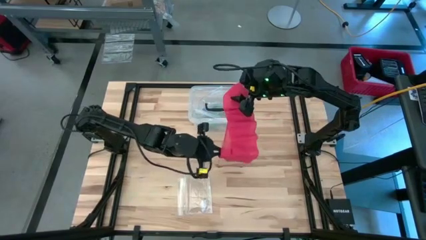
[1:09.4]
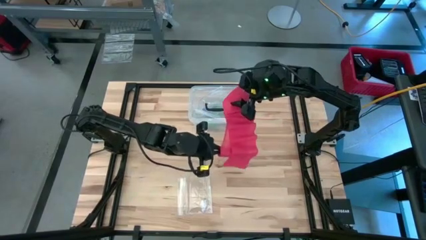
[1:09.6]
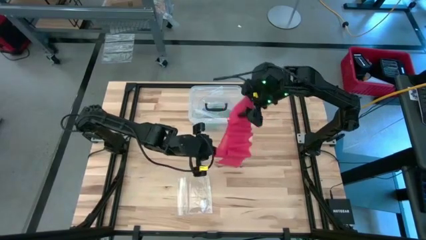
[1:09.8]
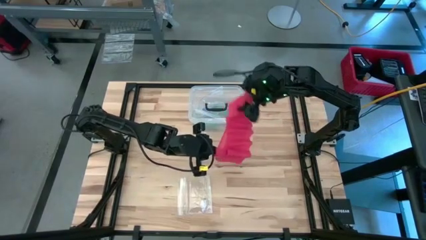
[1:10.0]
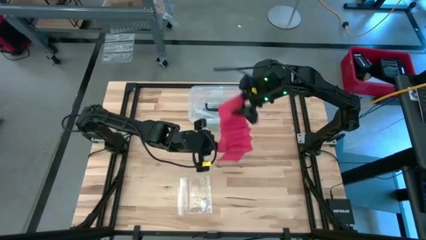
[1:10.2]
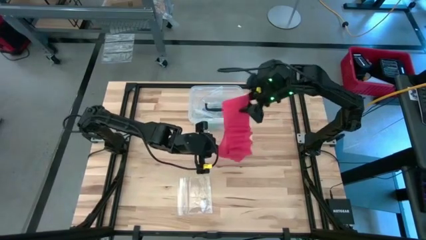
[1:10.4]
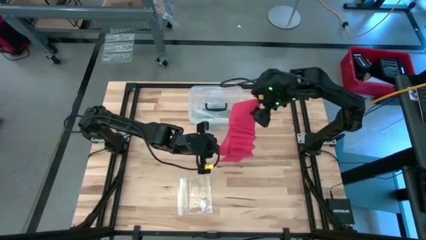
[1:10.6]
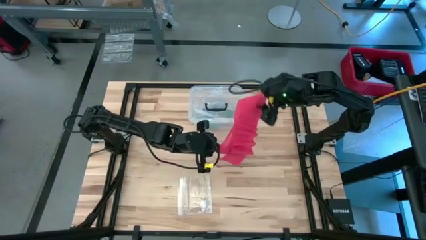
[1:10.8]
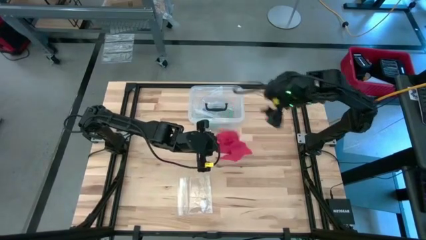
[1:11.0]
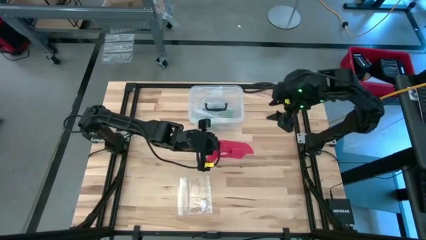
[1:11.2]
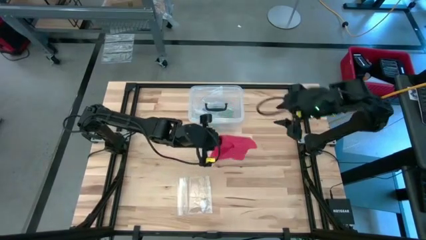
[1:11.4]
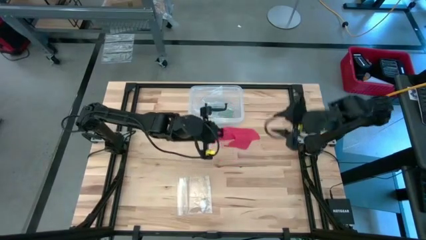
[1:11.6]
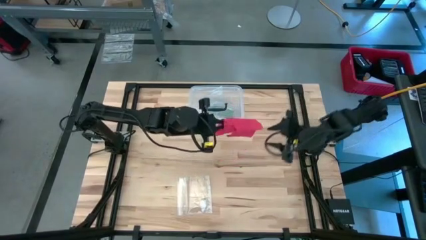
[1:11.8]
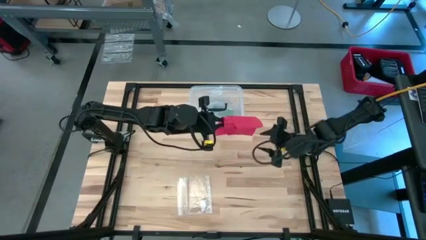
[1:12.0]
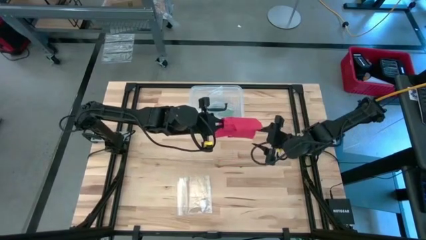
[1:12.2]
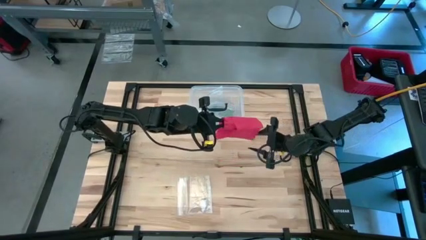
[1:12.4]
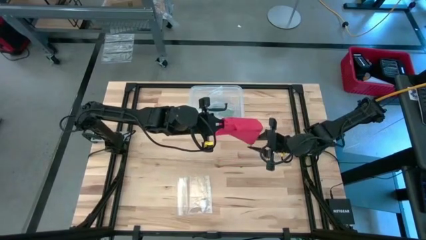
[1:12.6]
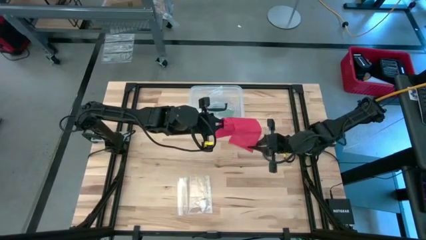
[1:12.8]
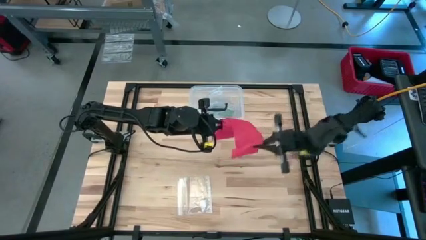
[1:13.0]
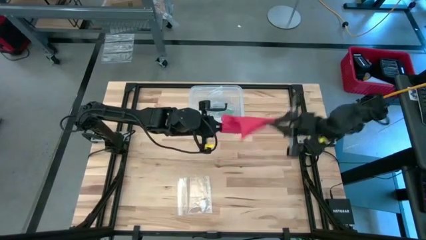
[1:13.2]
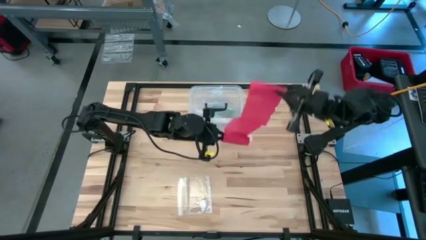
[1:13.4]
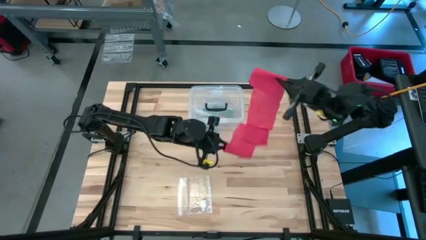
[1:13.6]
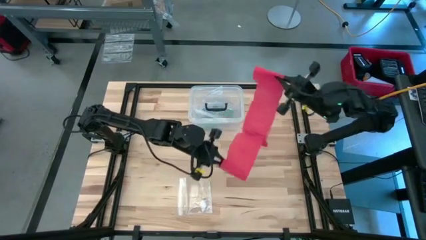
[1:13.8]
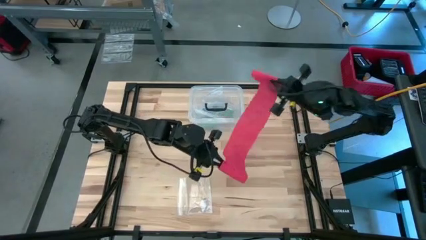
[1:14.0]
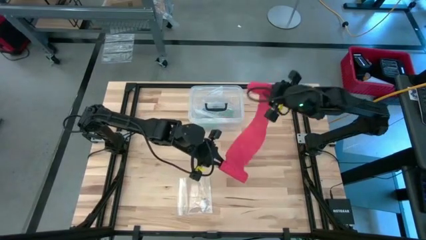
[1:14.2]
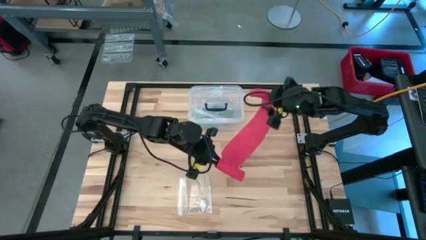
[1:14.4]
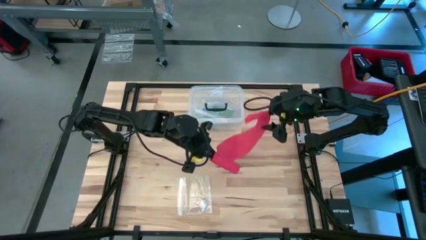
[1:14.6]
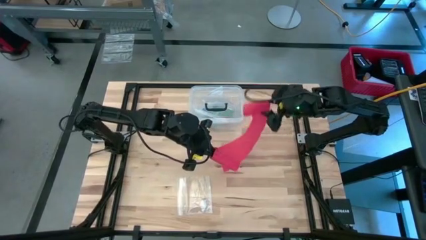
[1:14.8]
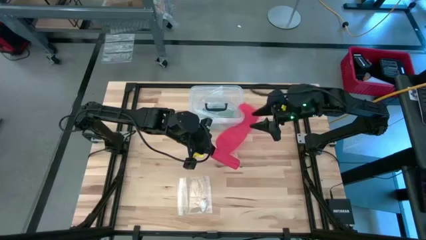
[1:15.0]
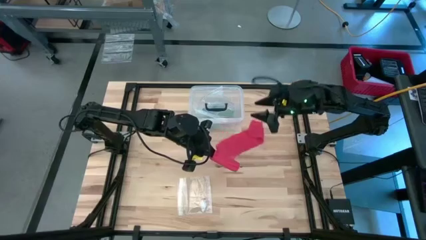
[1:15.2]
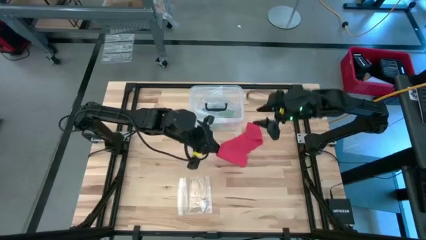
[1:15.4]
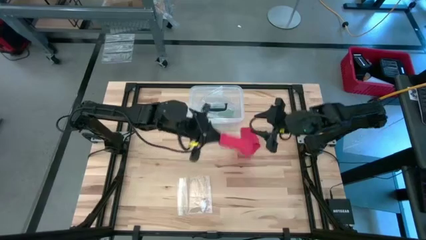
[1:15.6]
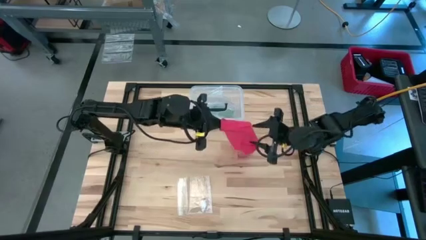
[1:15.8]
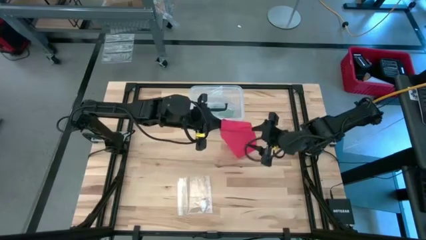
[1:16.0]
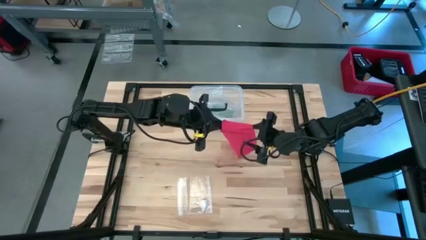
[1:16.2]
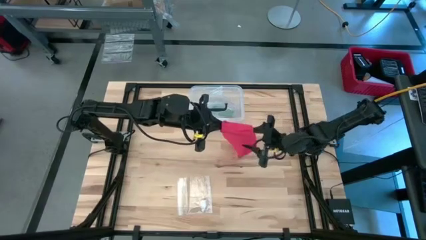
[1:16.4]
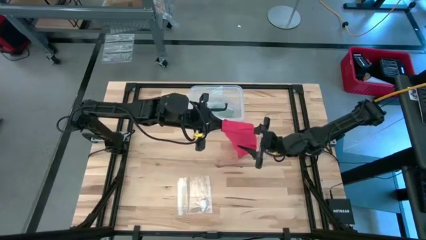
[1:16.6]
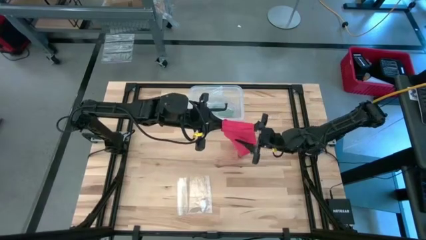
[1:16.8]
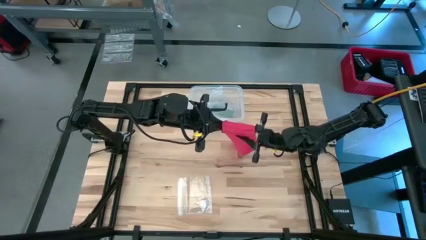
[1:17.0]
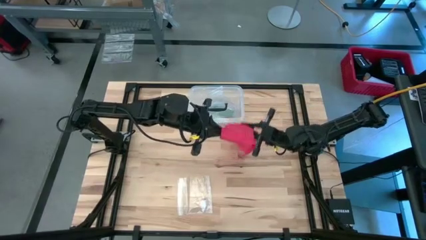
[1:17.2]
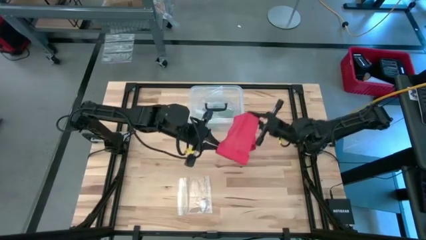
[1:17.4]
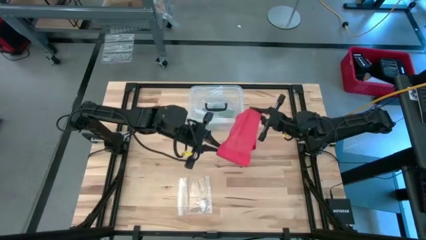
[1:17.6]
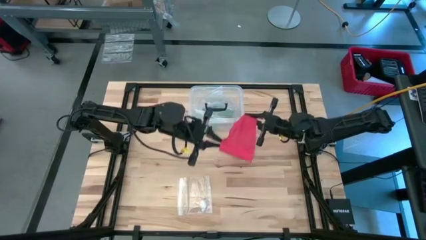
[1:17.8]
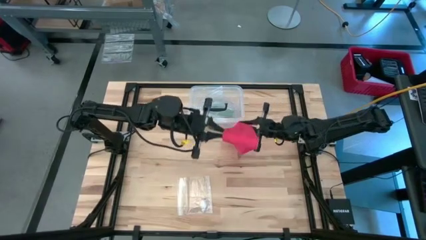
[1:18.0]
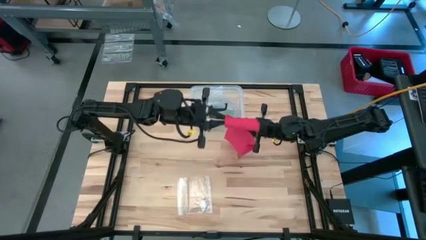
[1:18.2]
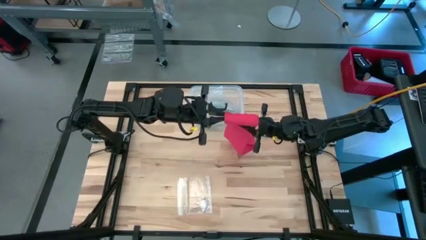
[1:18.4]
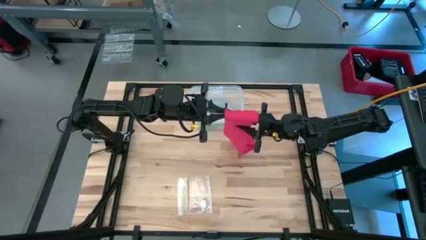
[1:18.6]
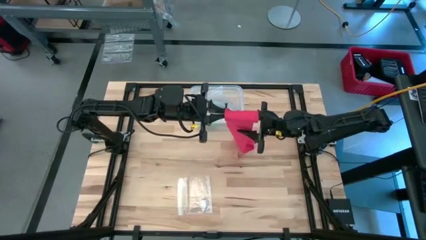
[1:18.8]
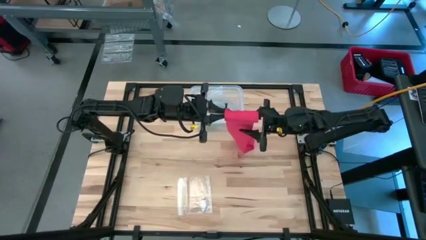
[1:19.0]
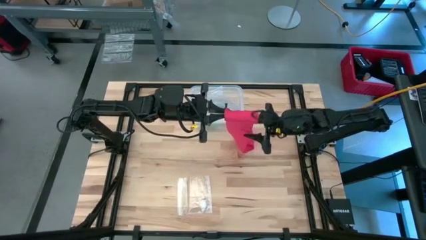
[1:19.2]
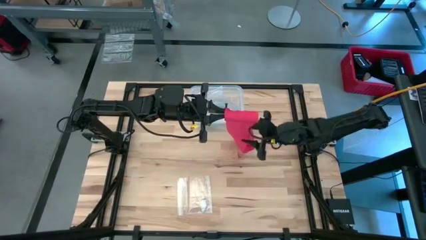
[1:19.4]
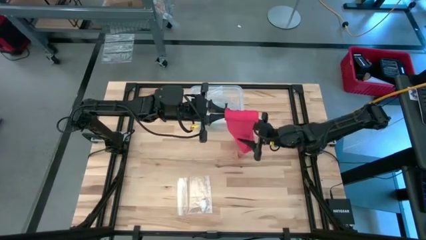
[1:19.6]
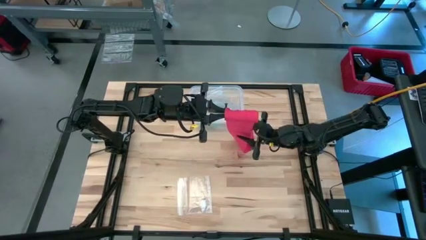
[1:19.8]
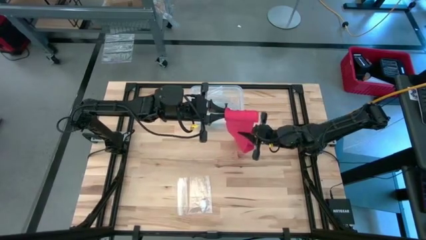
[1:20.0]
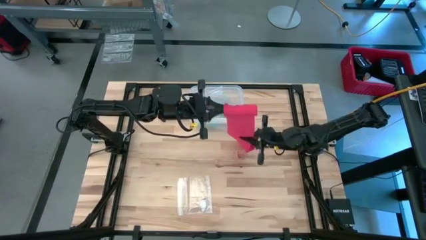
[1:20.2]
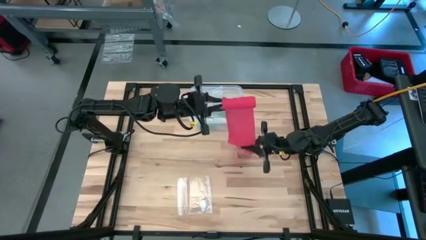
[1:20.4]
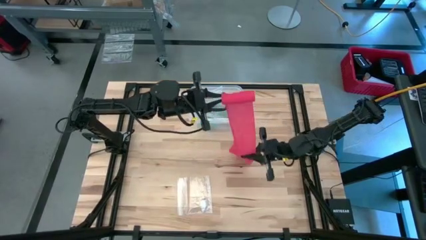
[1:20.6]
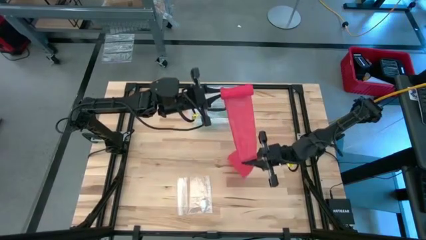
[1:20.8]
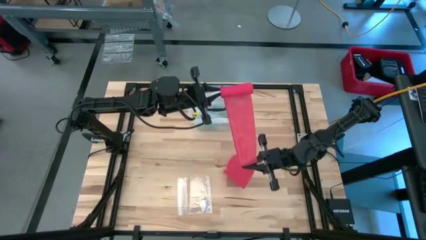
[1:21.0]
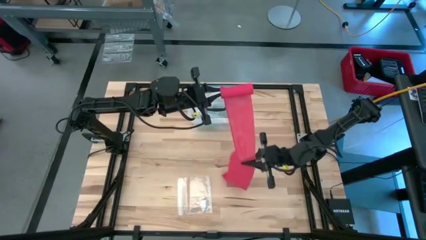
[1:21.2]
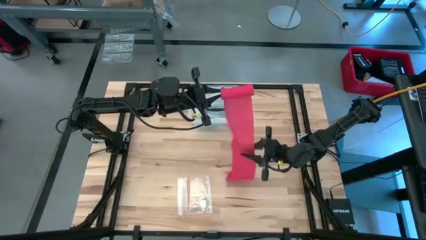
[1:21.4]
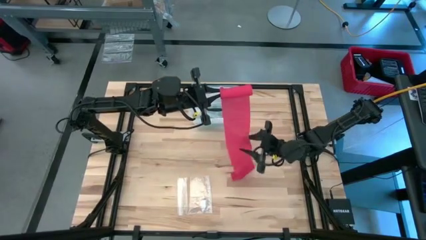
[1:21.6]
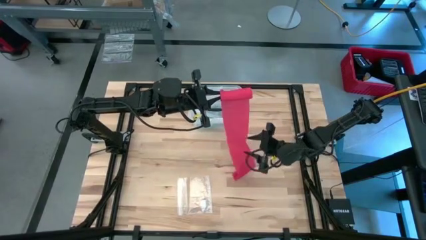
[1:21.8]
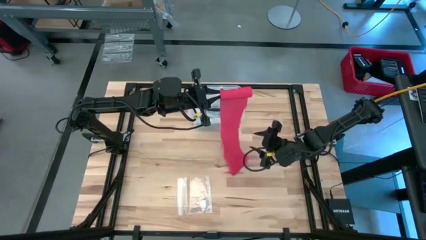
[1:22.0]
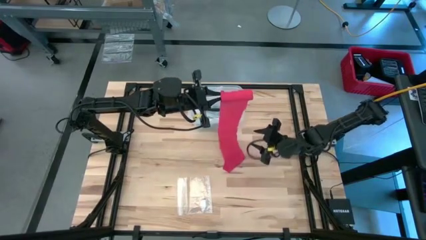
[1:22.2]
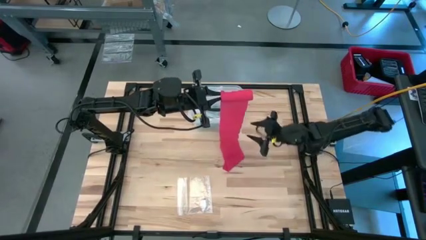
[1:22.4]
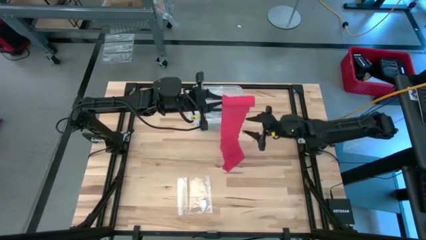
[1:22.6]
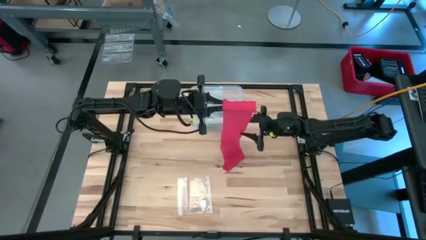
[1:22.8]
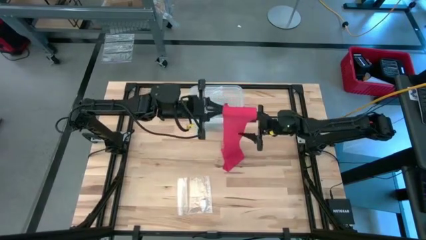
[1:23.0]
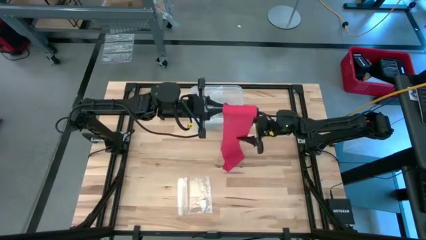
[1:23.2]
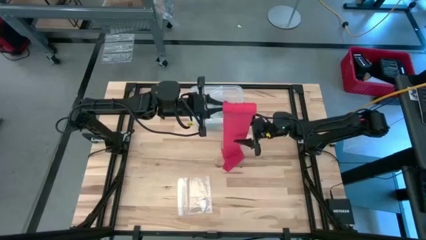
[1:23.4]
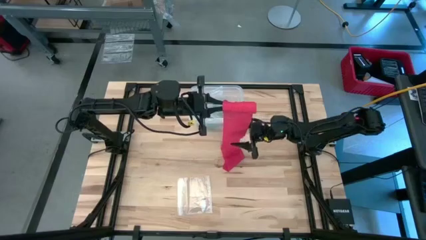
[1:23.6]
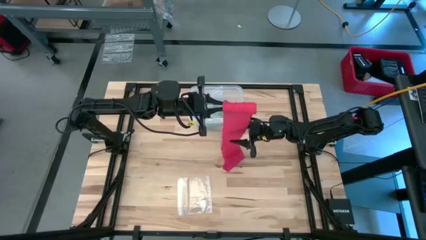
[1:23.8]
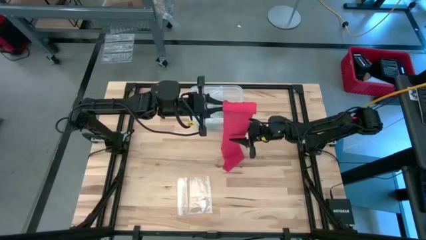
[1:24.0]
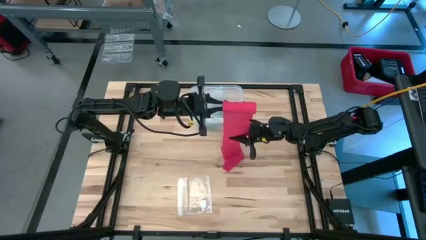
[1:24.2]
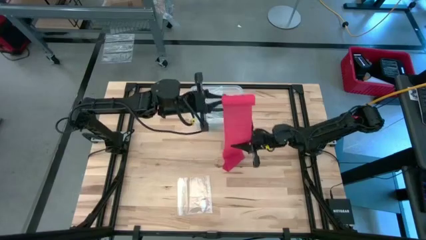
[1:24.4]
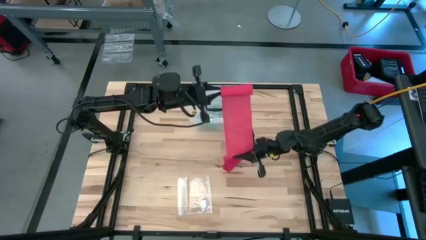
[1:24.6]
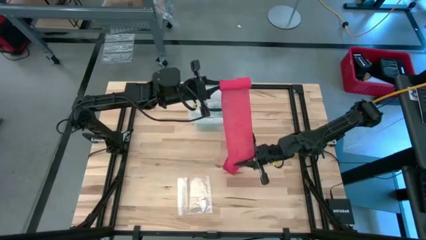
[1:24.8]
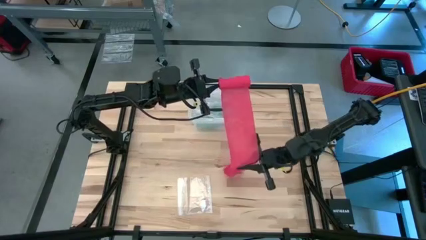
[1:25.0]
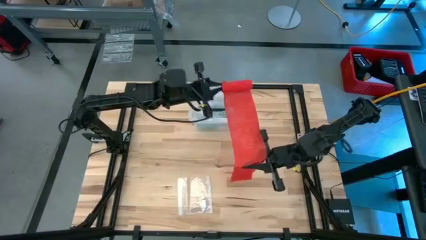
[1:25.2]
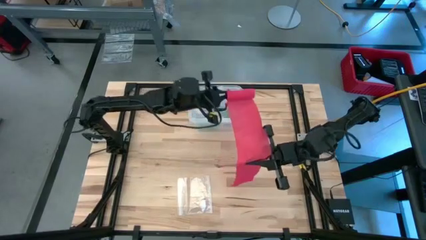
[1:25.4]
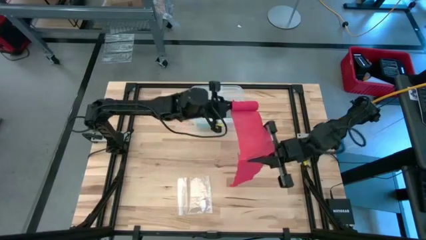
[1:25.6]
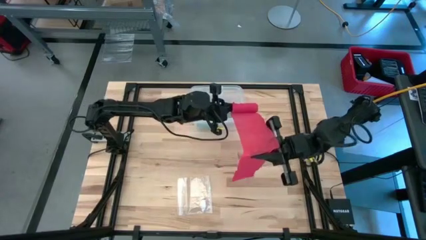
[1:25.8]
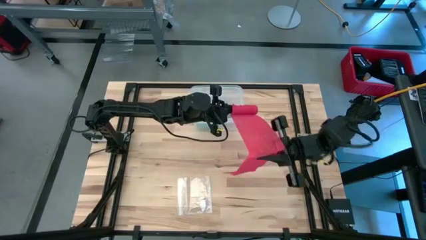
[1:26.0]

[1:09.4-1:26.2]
Task: Roll bandage
Roll the red bandage
